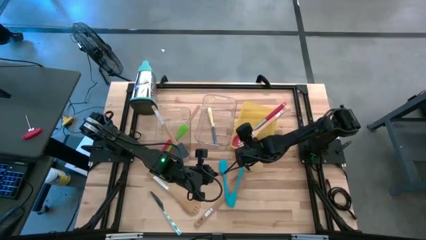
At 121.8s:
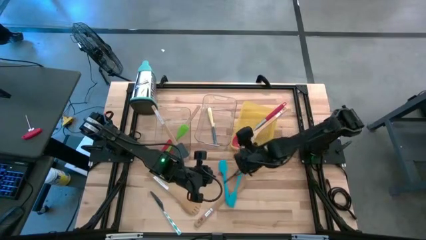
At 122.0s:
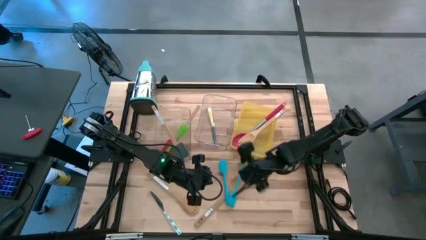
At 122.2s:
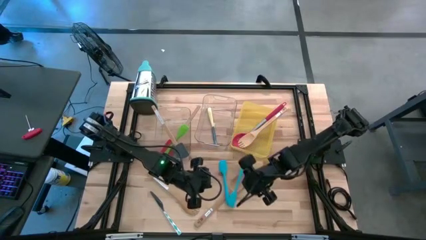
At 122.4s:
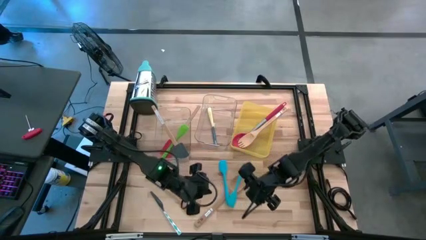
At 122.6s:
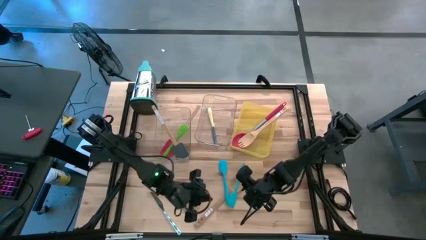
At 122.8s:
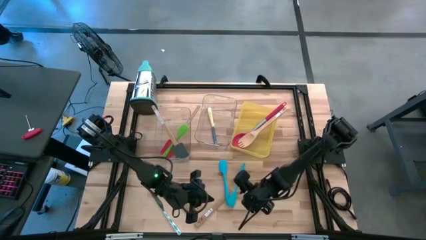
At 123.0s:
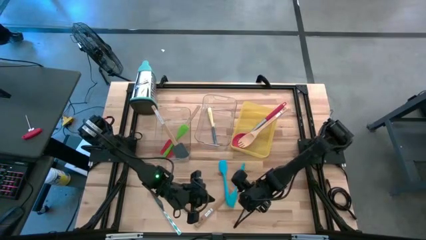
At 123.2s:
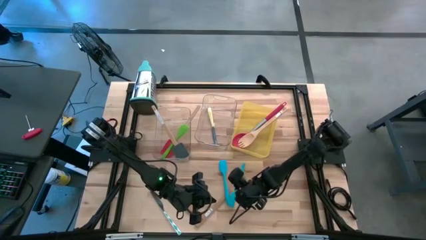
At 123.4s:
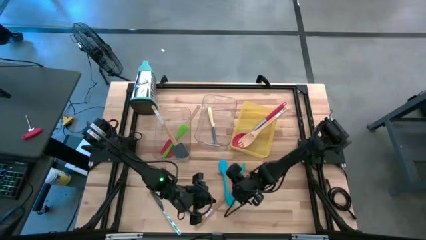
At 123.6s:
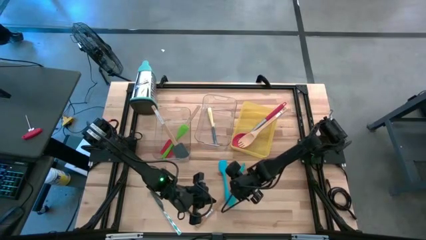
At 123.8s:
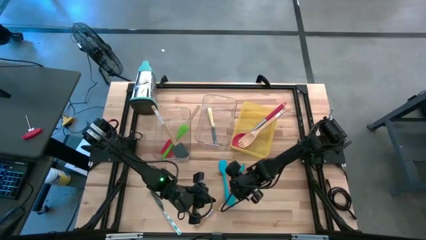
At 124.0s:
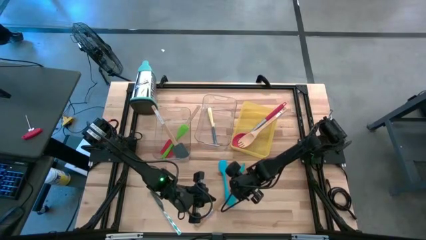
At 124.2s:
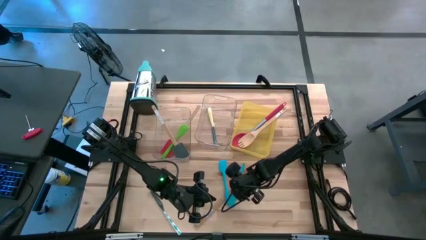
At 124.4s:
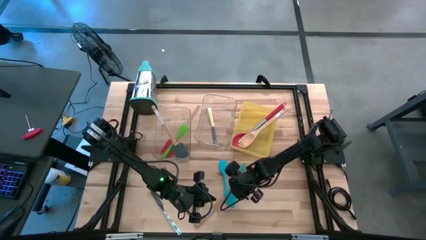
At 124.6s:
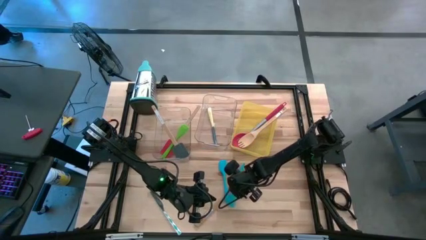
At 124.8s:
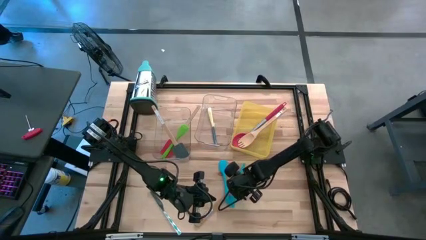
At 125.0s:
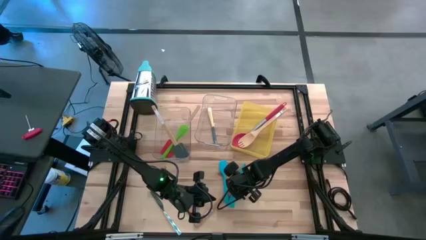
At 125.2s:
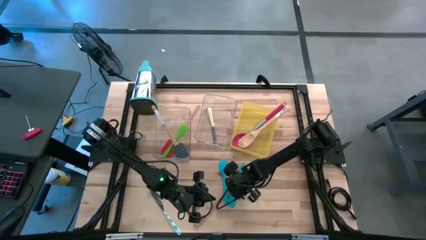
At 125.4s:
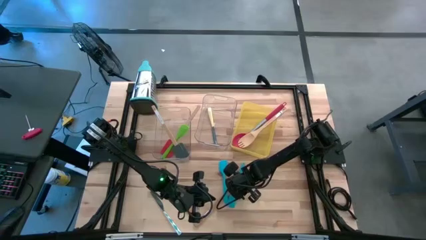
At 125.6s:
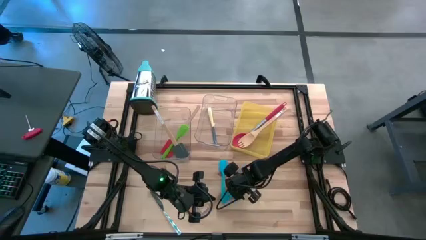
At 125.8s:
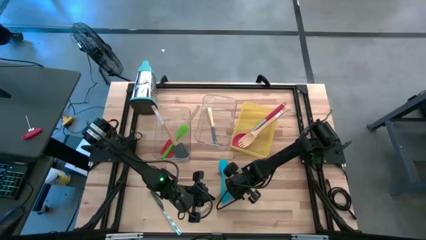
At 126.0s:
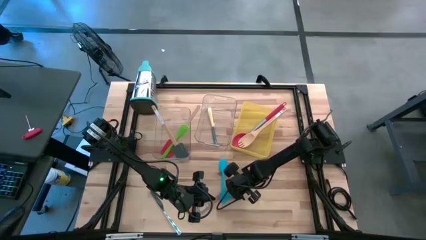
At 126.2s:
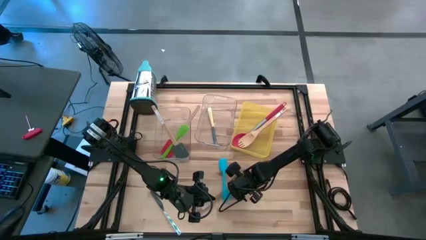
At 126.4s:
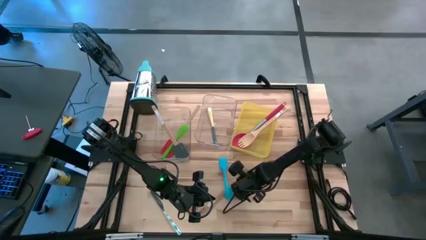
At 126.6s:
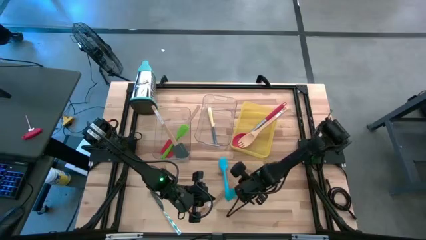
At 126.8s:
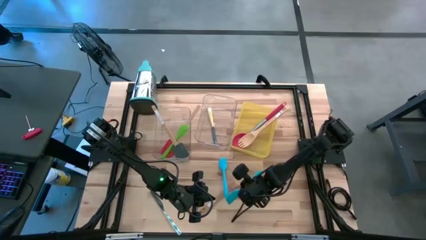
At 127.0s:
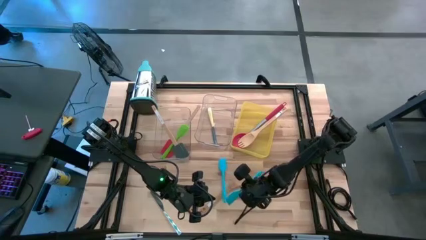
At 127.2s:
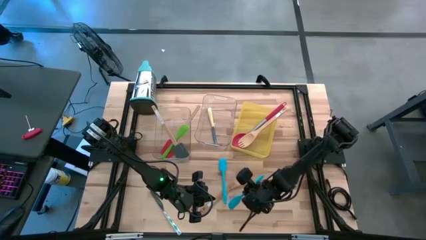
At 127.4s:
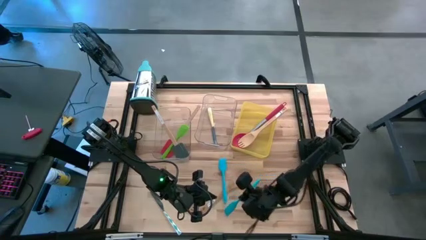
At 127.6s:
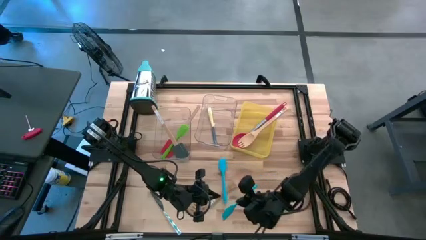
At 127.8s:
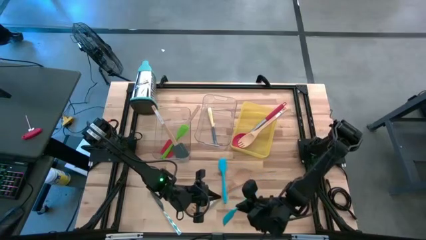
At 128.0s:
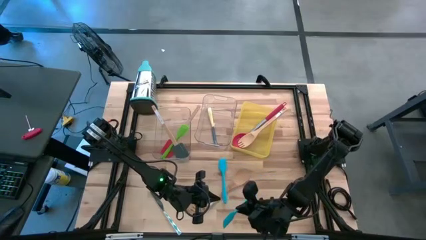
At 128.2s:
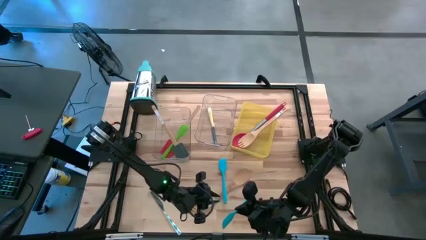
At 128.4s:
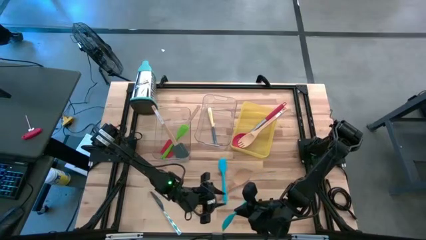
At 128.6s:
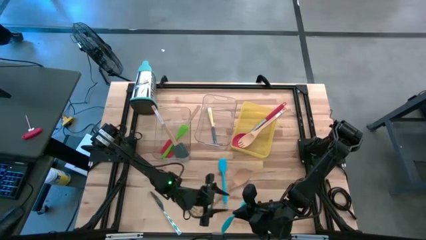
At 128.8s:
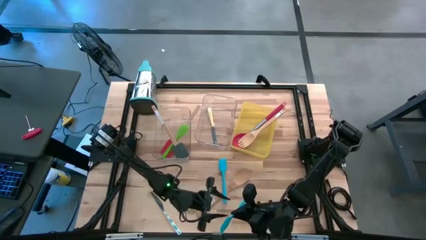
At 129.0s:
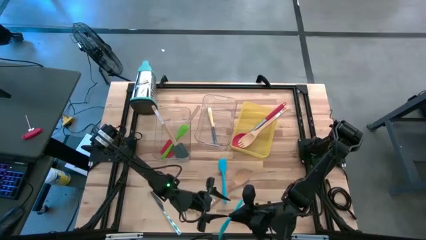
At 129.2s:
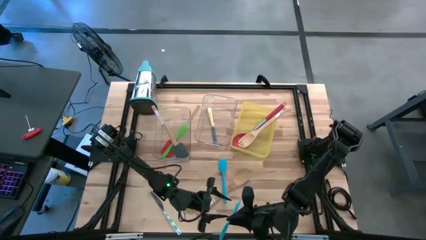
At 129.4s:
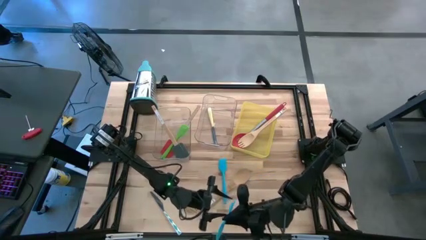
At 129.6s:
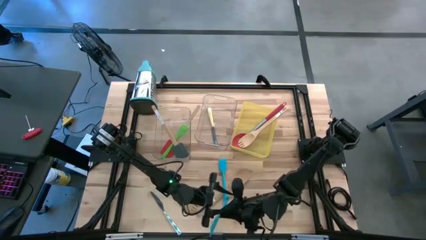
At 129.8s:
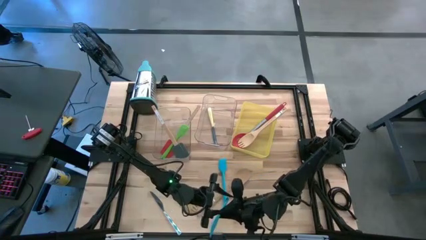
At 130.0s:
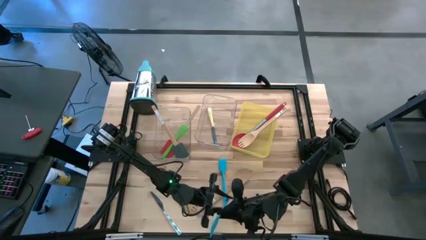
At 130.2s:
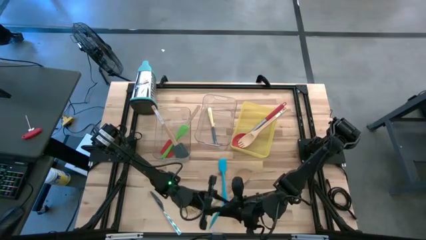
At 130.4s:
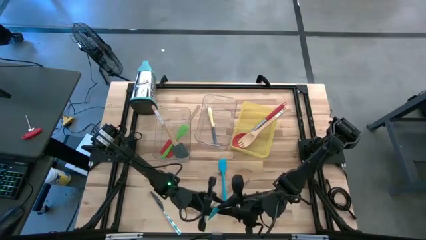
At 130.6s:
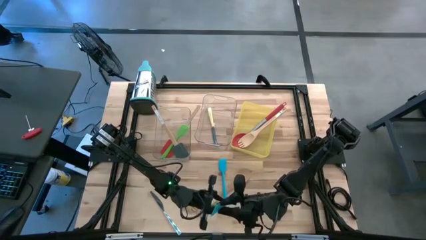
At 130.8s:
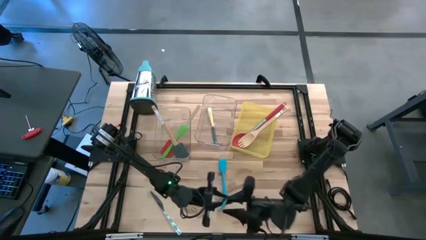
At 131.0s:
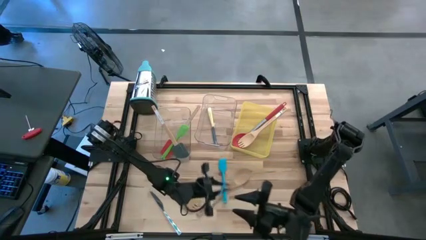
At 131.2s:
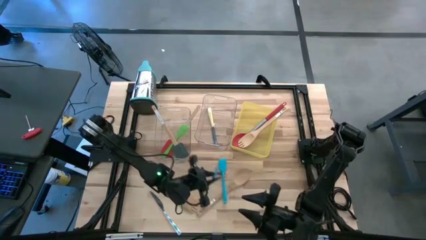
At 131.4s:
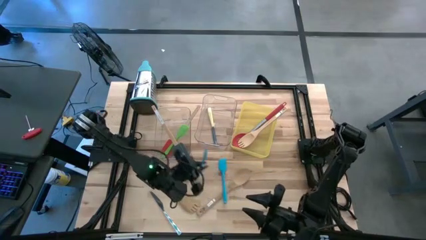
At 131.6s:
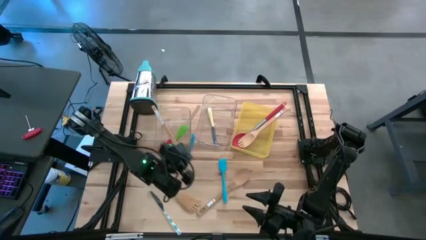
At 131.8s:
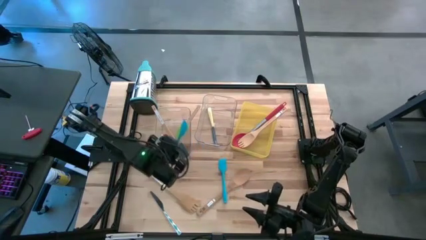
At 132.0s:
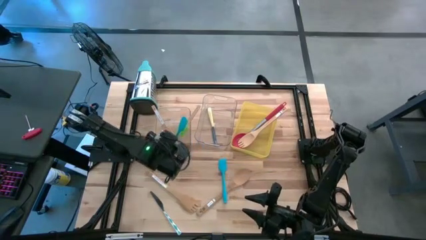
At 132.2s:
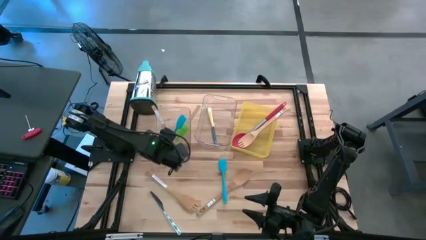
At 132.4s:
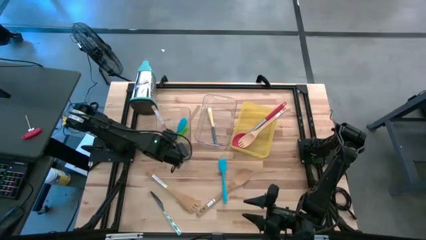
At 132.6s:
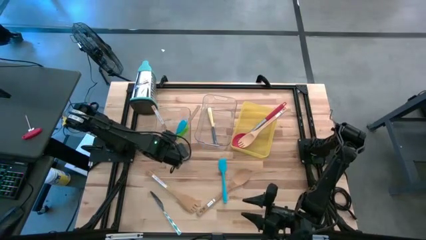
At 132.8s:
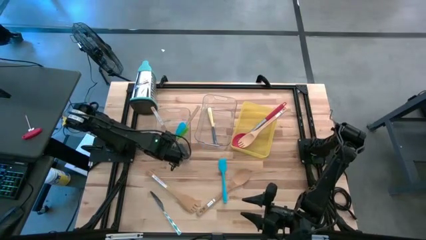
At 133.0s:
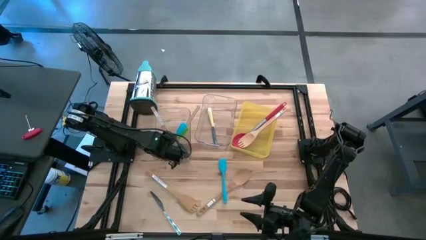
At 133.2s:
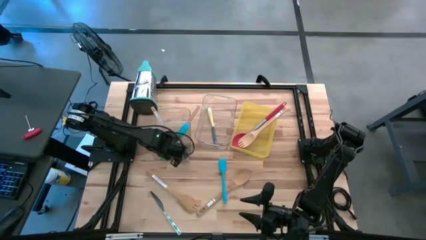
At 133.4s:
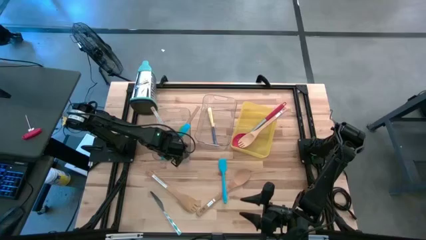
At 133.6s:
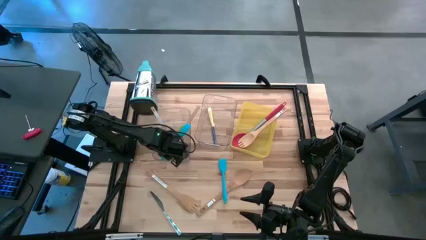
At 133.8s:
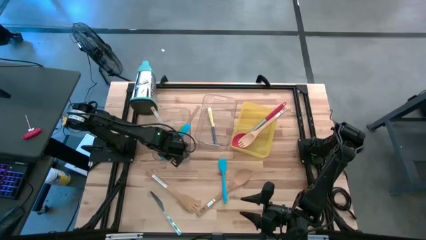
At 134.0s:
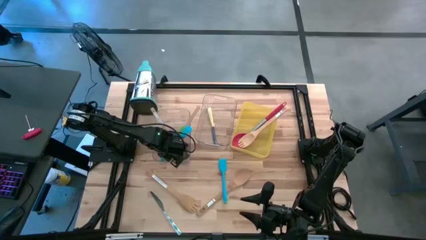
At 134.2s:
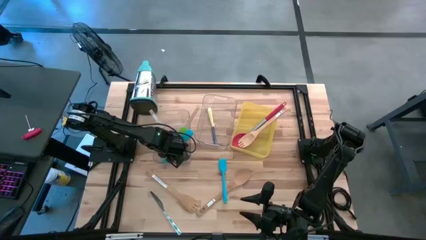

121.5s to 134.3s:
Task: Pick & Place Kitchen Items
Put the blue spatula into the left transparent bin
